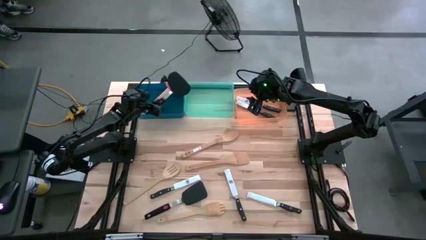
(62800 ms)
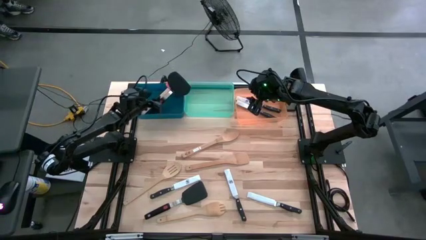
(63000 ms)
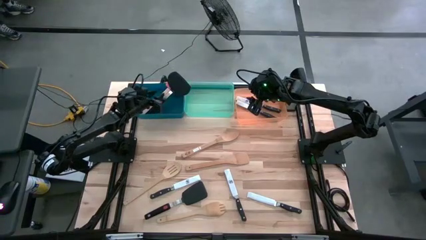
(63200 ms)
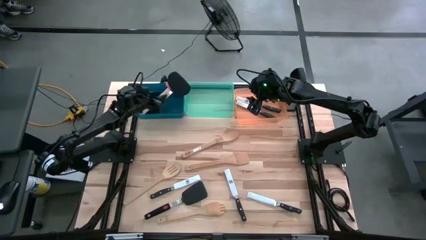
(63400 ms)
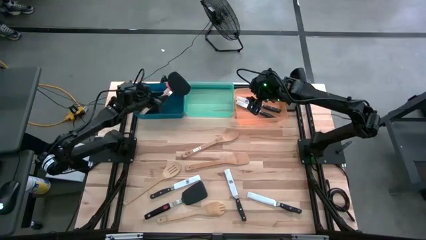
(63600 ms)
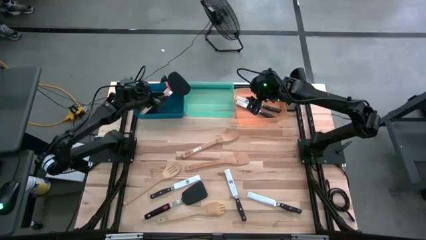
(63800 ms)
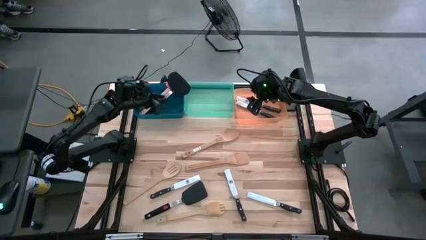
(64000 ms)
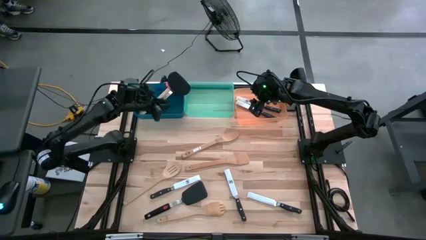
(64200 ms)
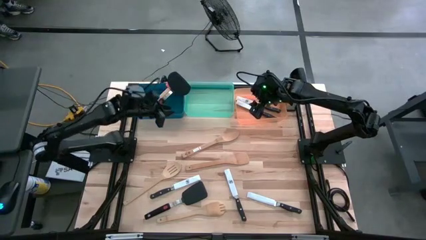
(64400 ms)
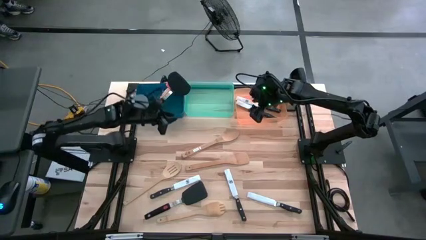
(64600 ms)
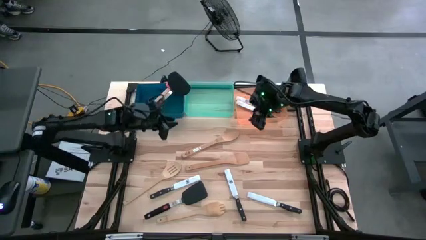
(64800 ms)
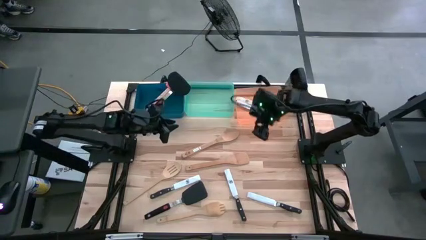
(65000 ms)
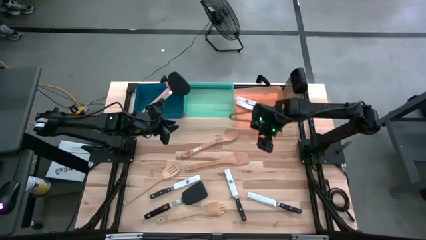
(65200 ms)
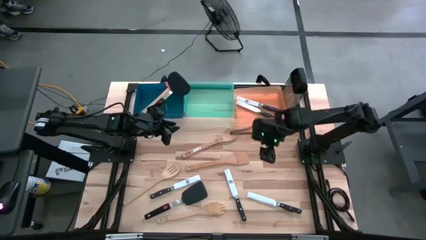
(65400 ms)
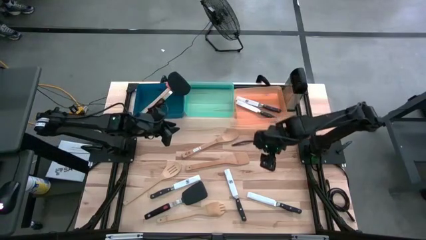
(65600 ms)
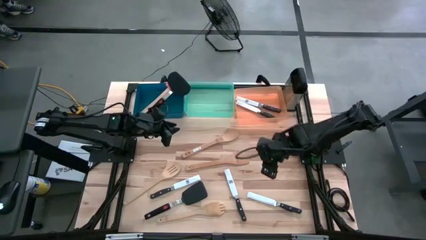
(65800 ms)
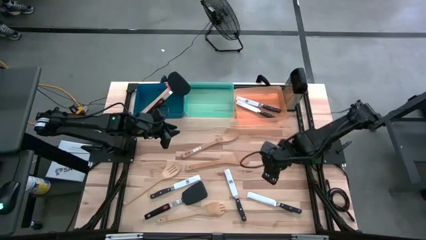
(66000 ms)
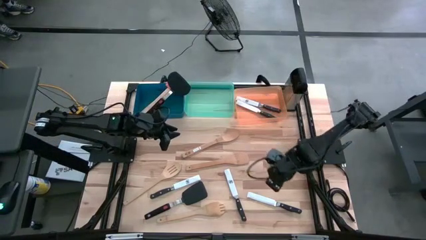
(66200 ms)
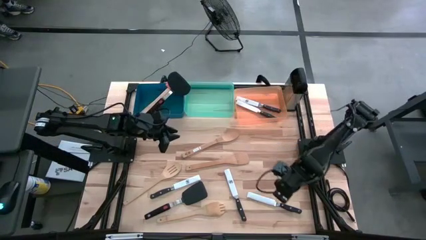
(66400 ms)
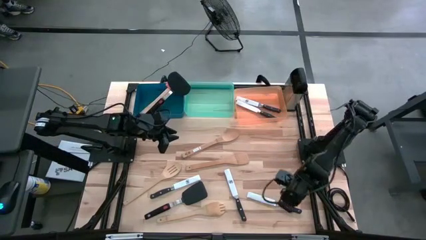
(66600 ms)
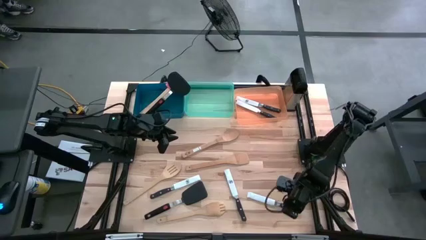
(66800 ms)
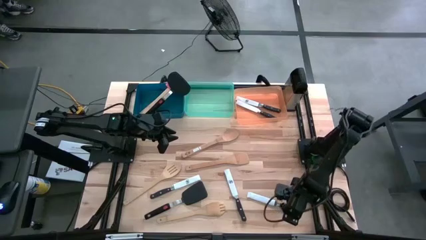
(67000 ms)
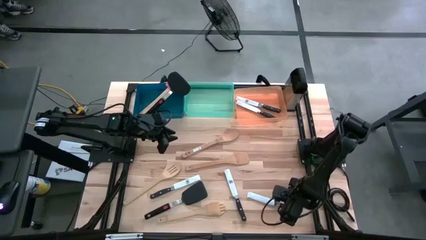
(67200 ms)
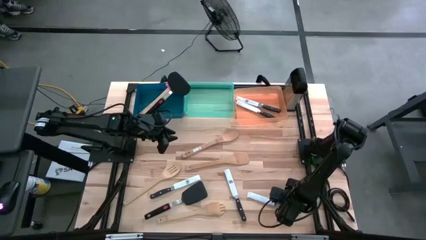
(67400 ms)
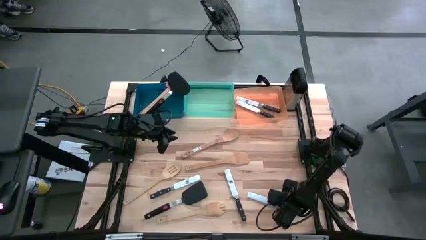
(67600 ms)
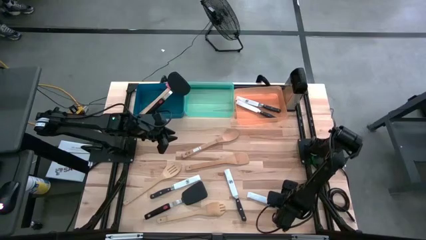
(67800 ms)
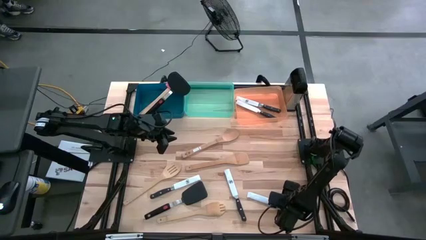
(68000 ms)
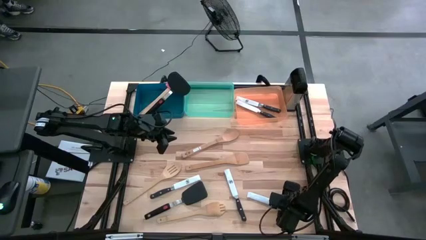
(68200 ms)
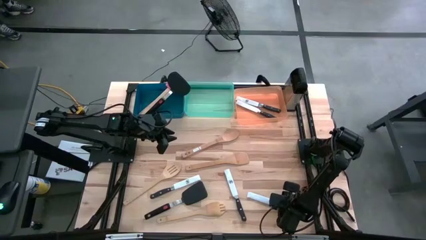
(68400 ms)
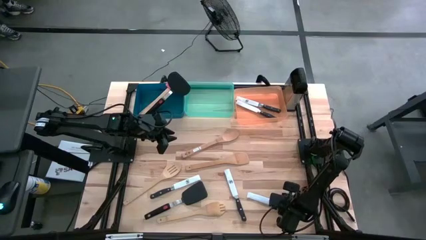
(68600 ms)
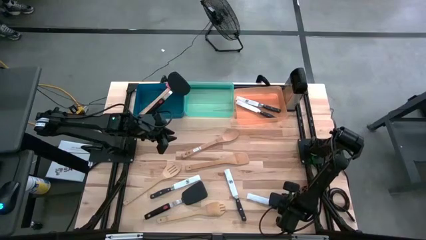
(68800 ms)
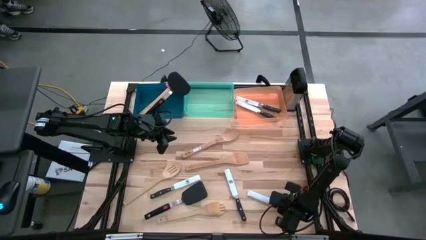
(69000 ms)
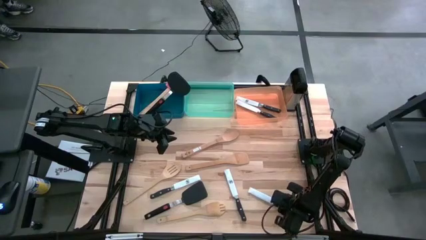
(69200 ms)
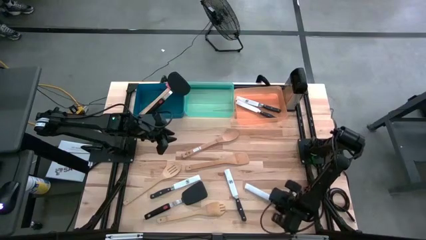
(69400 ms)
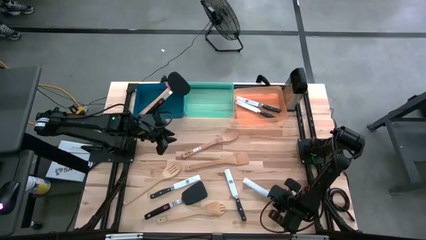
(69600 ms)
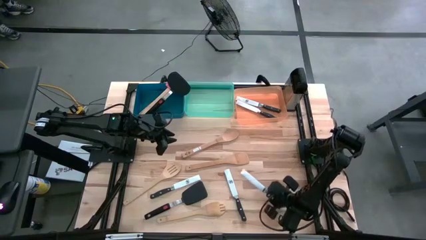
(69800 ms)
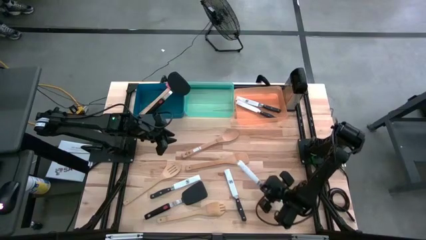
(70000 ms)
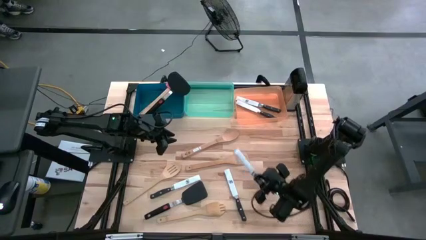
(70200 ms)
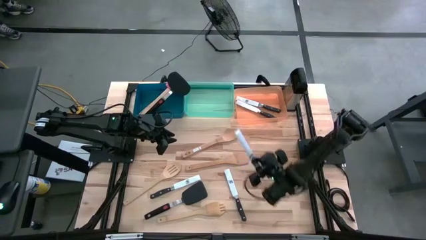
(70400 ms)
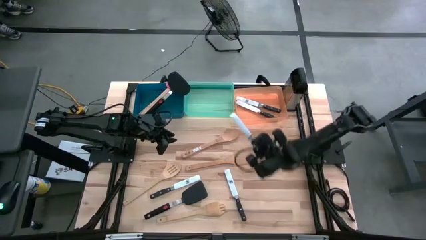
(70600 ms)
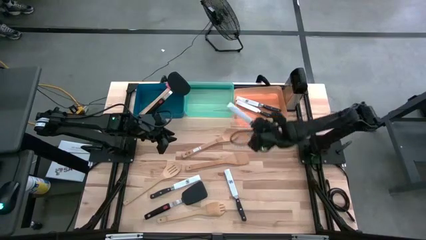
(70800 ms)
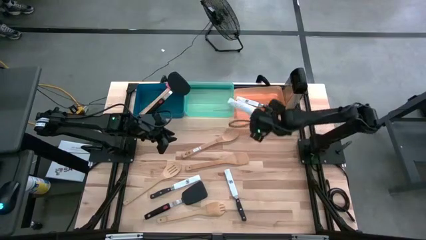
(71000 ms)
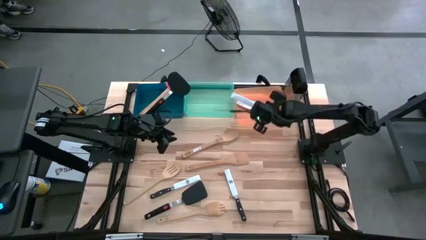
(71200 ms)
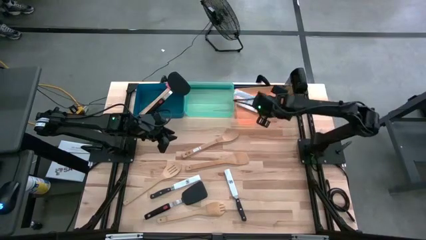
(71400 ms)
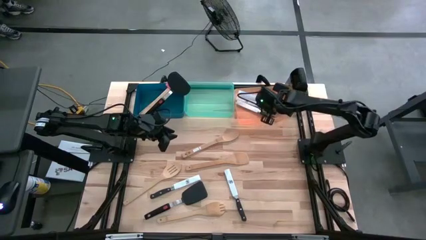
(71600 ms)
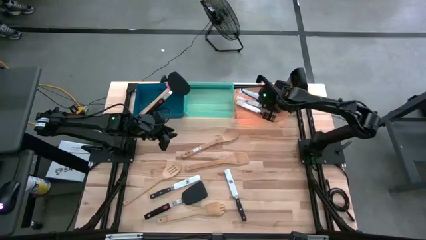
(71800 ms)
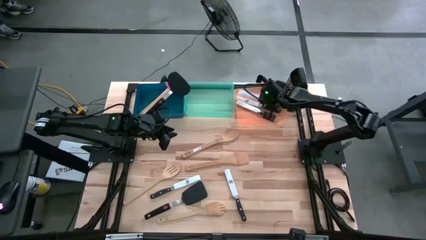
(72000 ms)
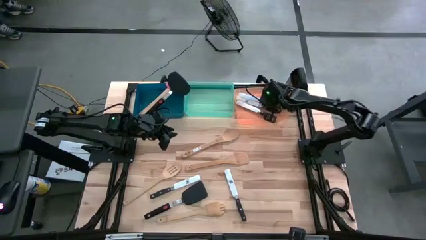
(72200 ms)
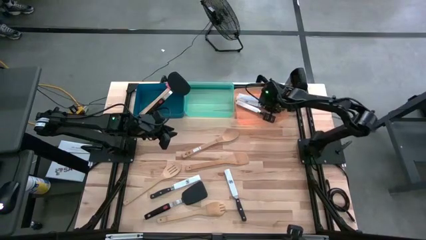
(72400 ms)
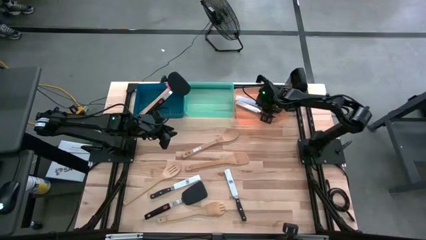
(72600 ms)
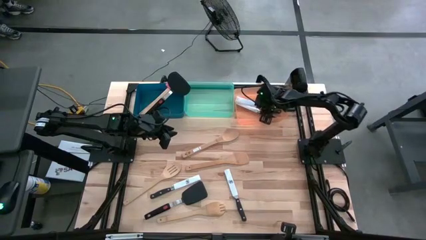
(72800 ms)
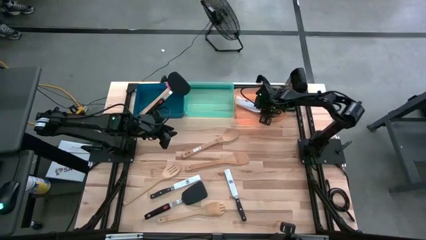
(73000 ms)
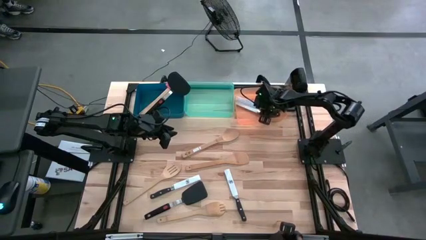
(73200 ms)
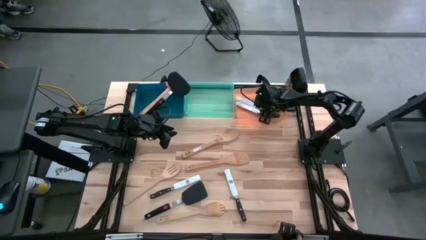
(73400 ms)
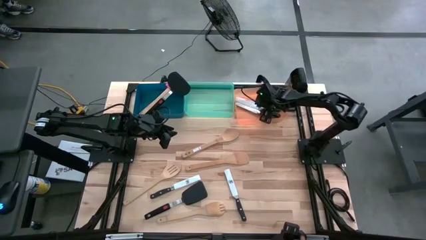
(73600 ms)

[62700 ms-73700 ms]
Task: Pick & Place Kitchen Items
Put the knife into the orange bin
